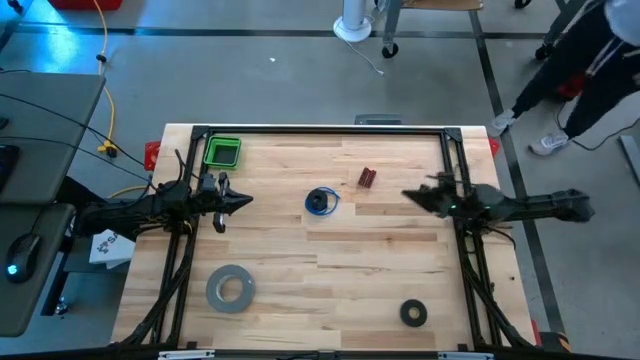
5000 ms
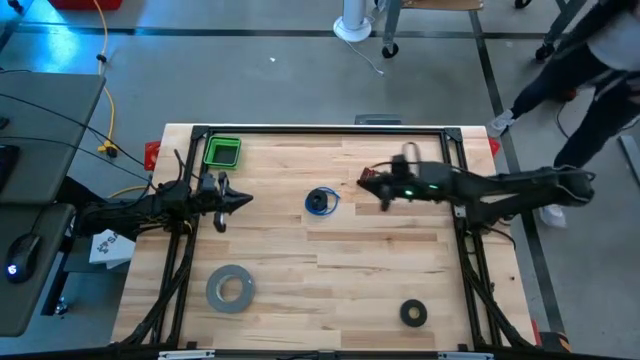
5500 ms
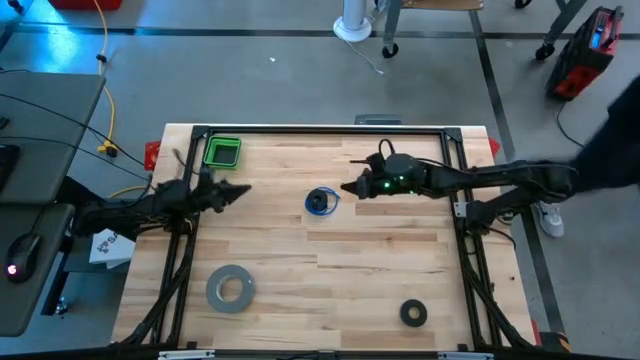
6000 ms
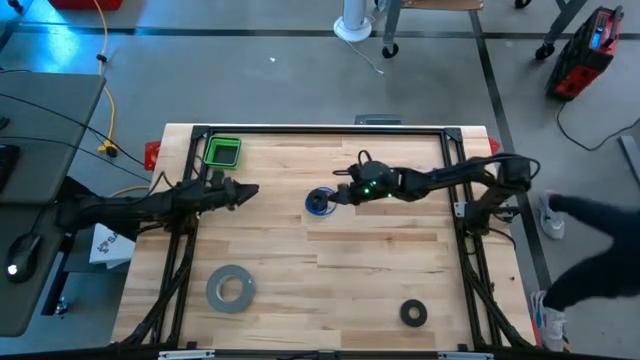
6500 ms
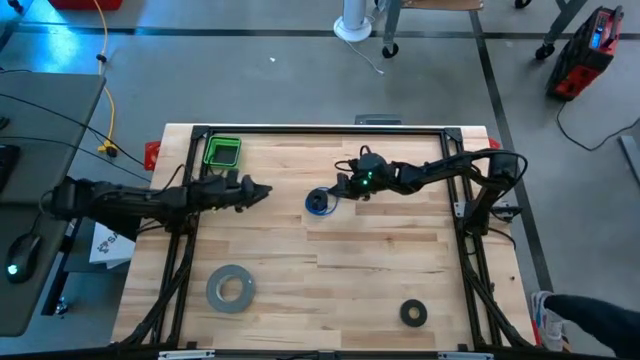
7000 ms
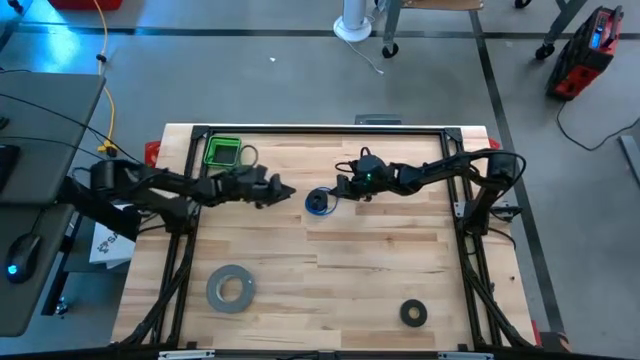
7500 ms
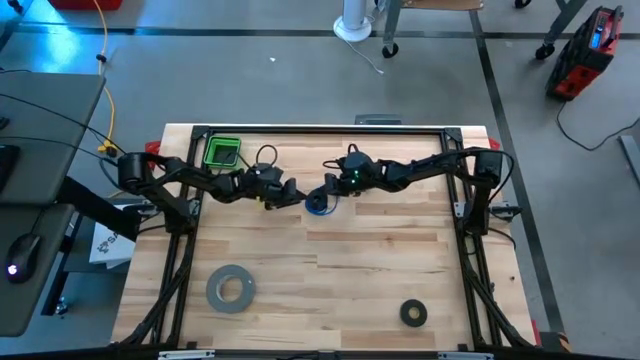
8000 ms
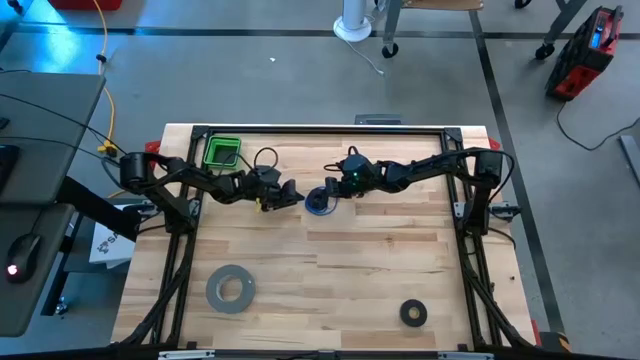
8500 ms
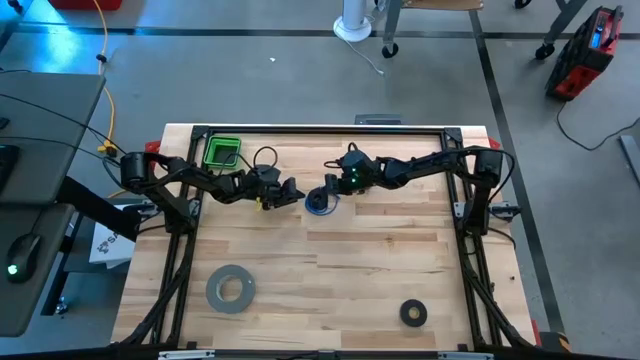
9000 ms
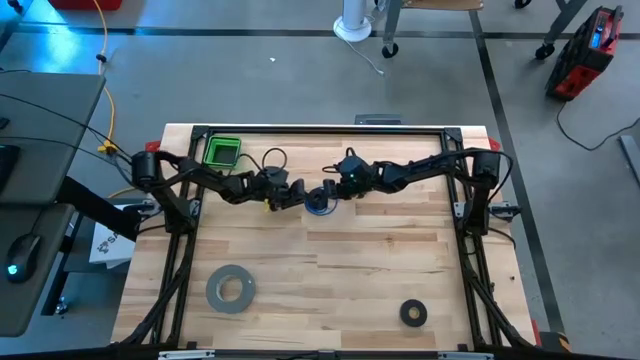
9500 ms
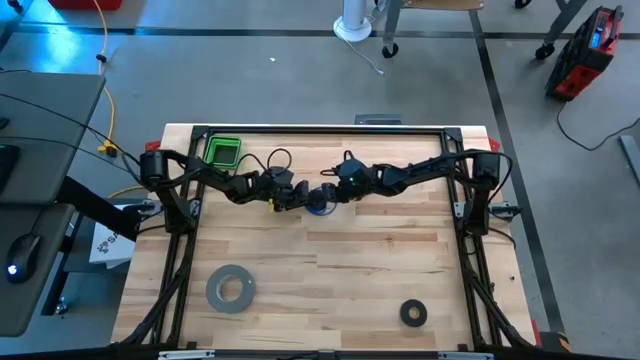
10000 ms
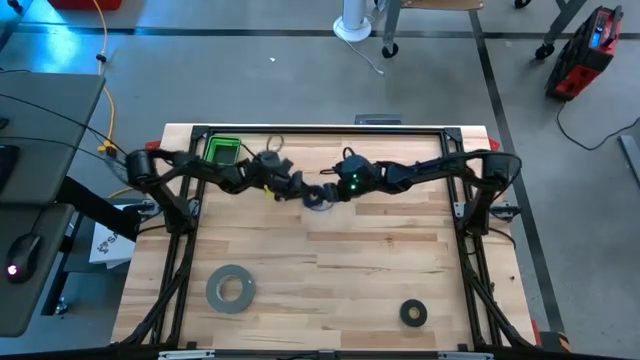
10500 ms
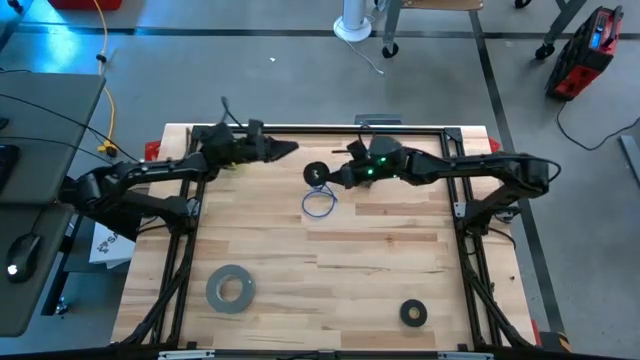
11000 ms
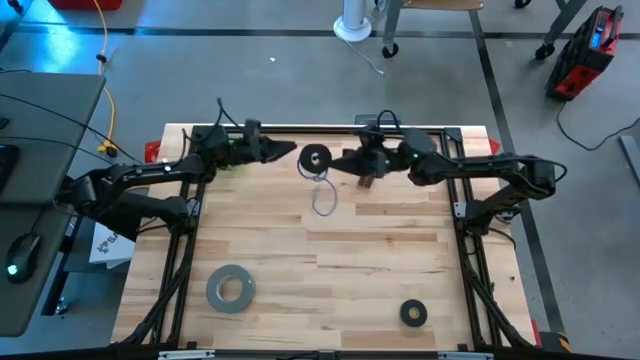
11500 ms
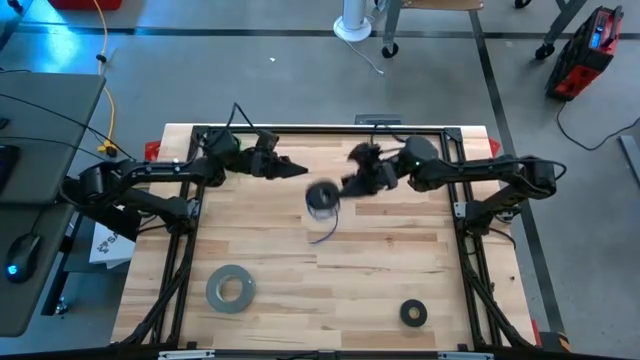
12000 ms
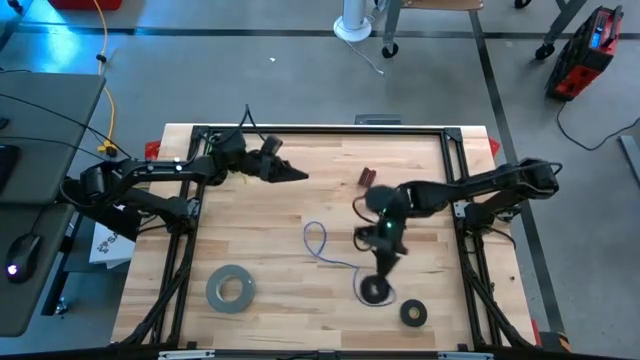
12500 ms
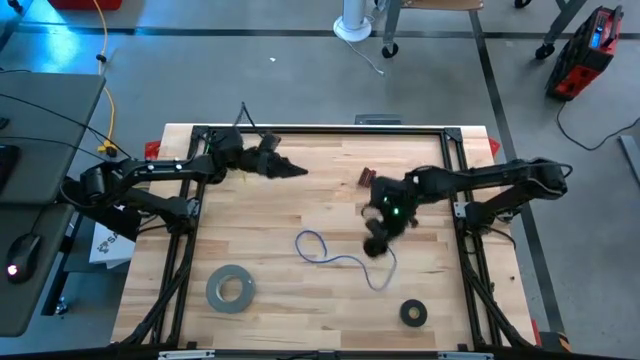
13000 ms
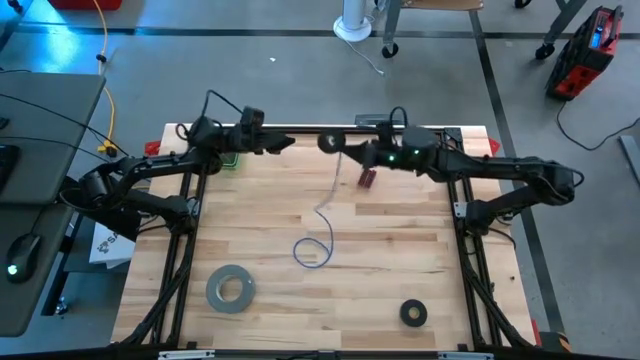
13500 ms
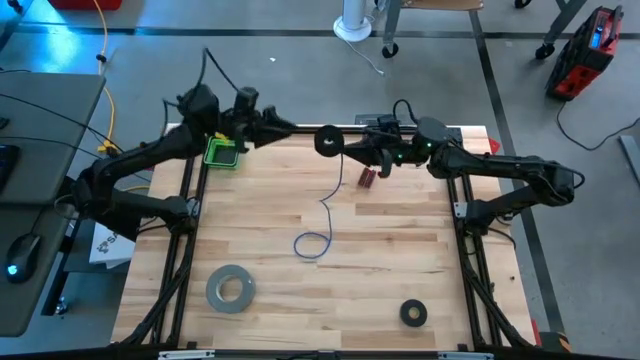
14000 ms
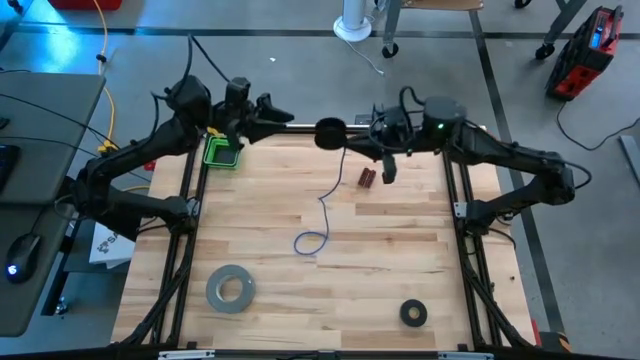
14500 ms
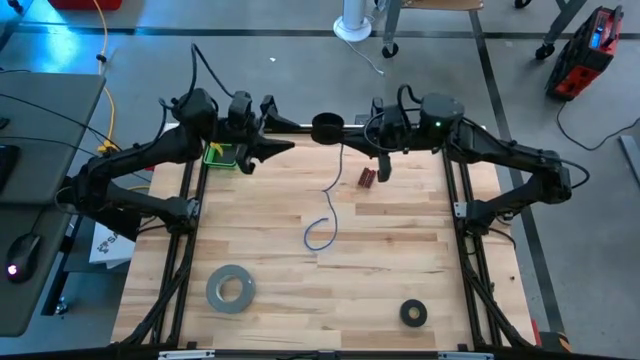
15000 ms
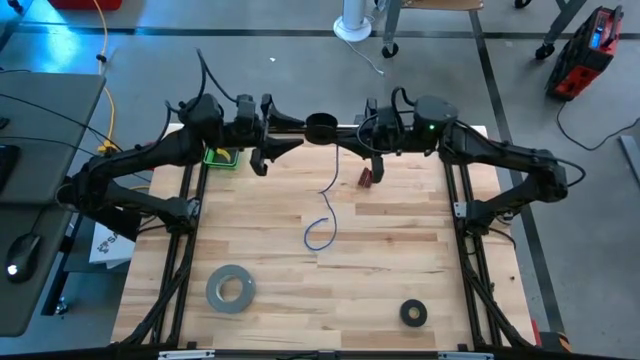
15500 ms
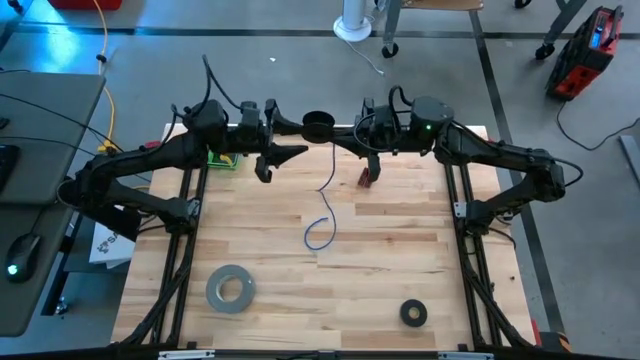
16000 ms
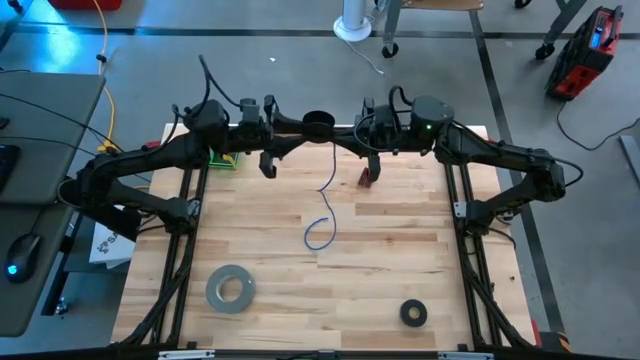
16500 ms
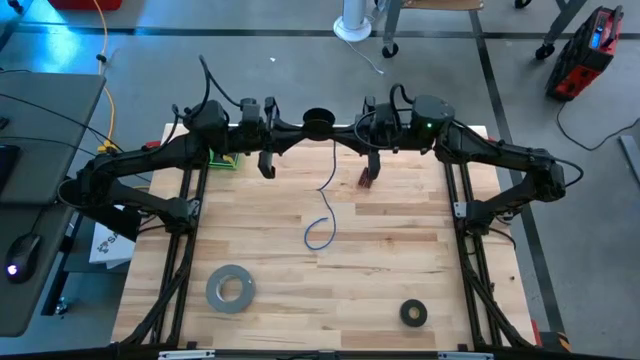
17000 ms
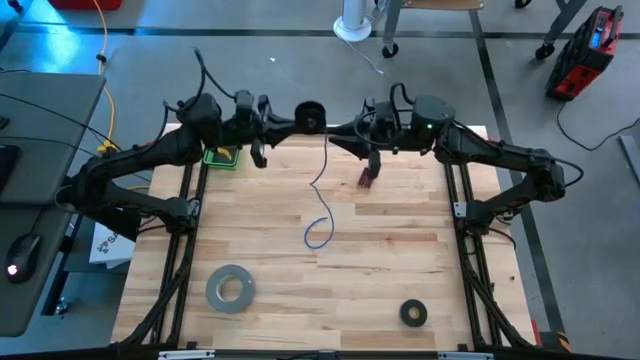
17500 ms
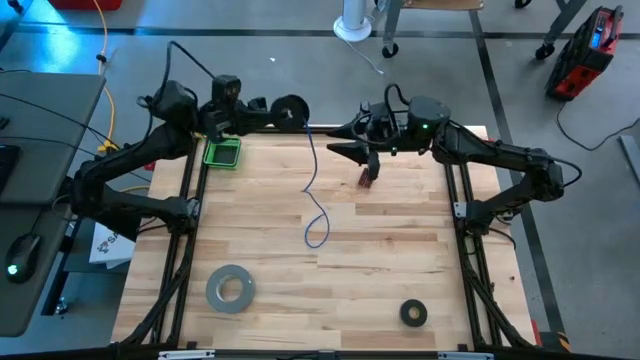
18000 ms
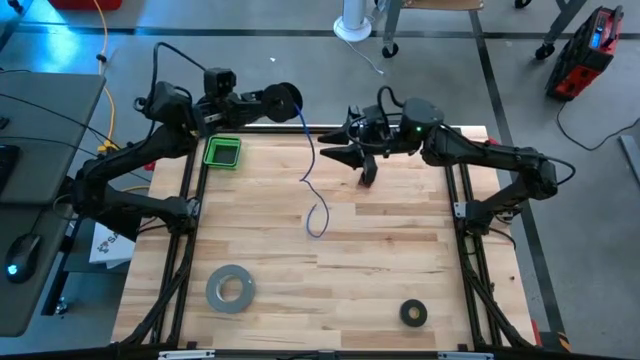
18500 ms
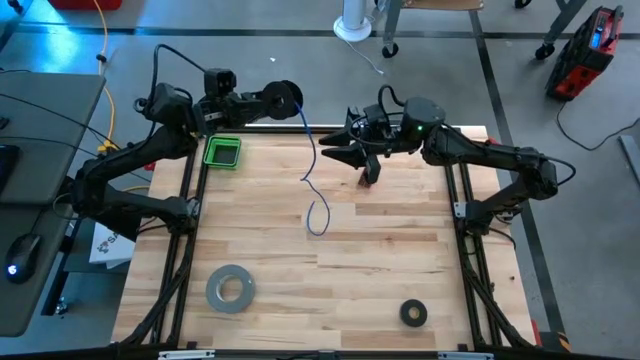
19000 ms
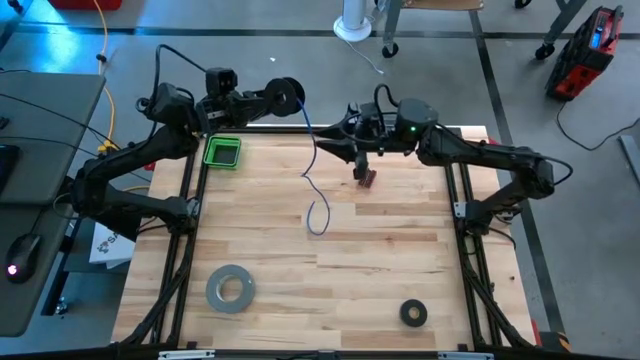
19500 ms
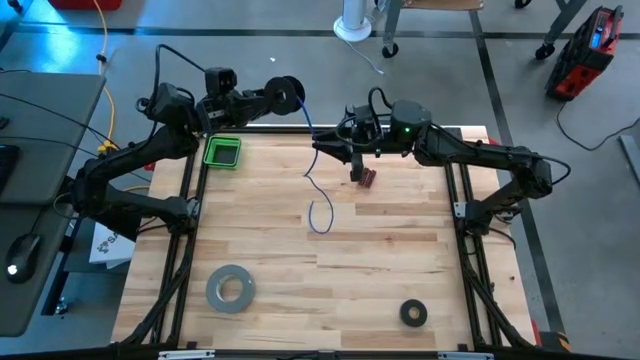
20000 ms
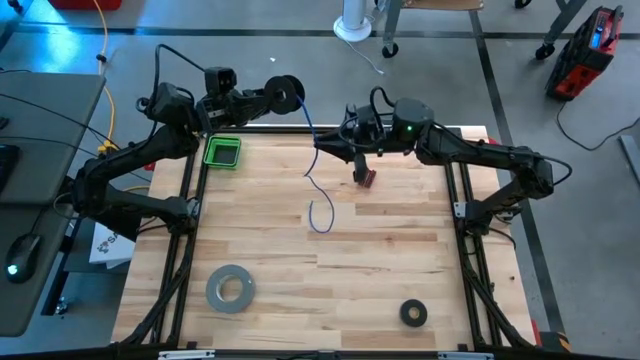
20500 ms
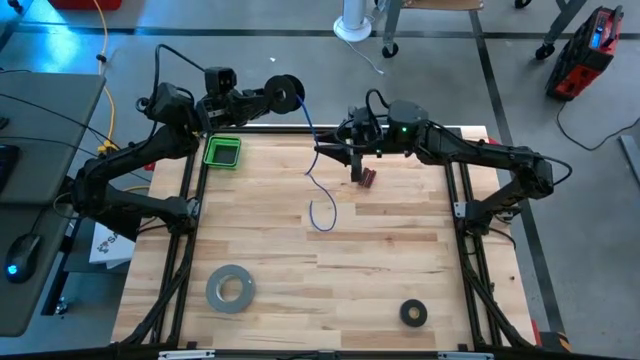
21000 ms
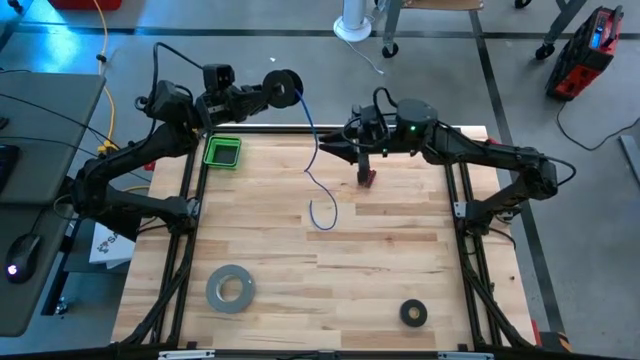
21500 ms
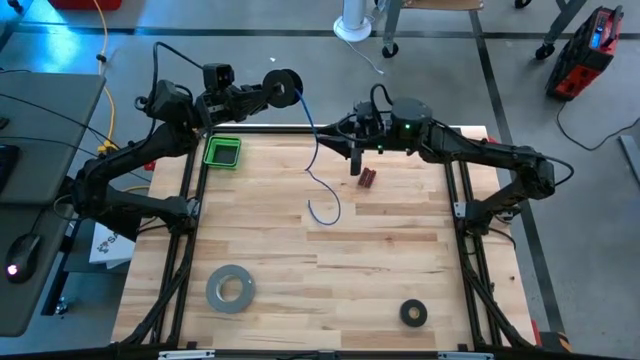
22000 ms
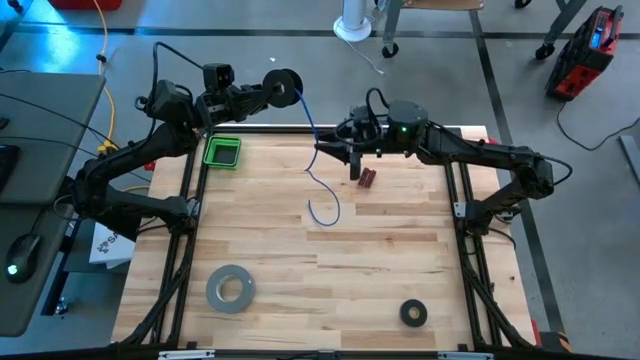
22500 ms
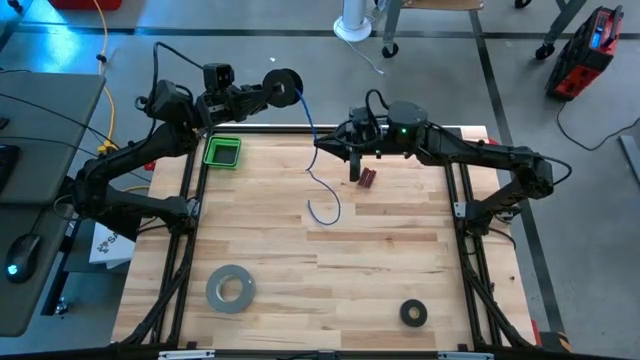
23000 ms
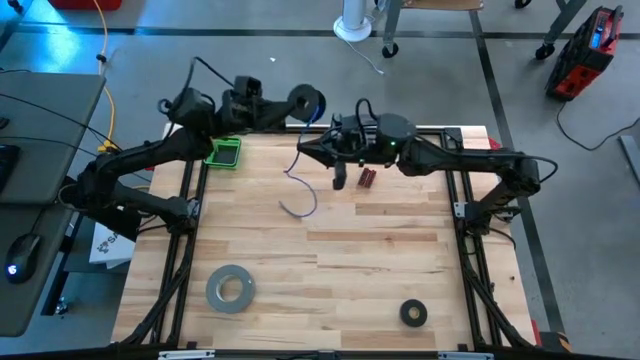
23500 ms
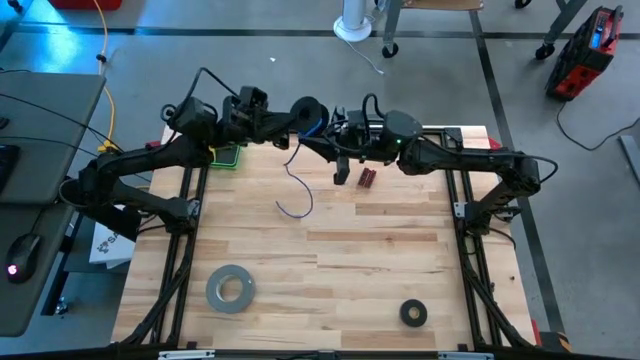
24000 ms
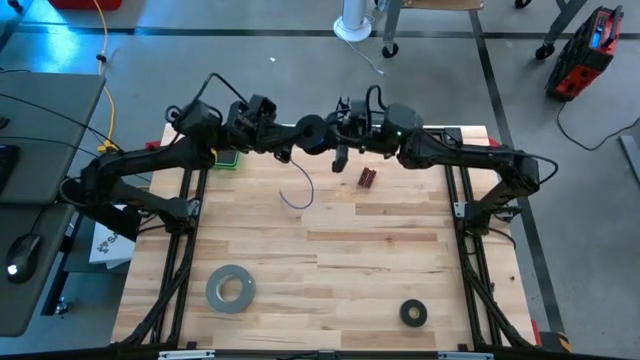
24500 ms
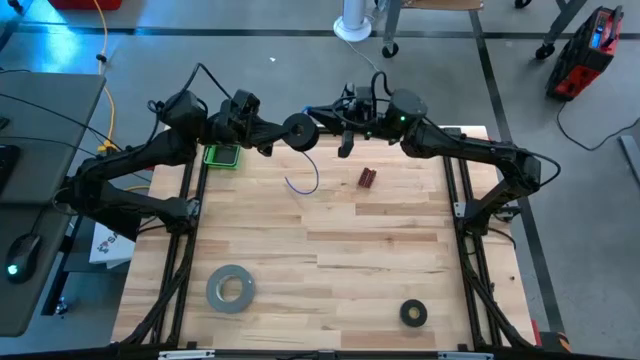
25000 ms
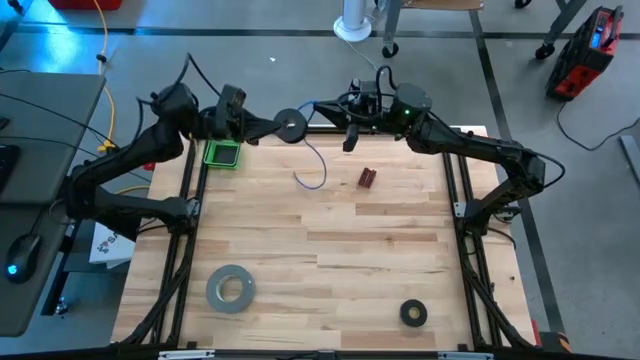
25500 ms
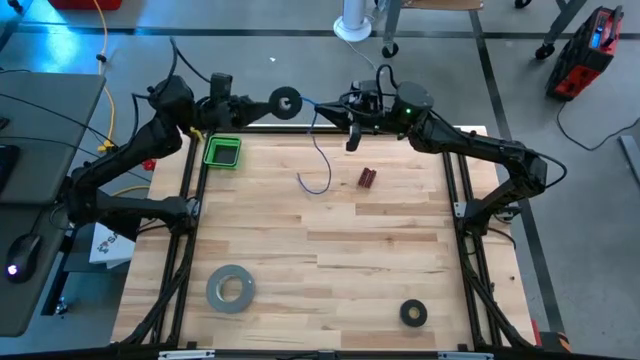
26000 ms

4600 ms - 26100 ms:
Task: Coil cords
Coil the blue wire onto the spool
